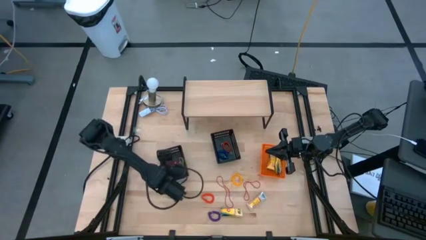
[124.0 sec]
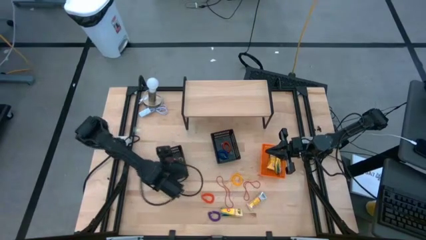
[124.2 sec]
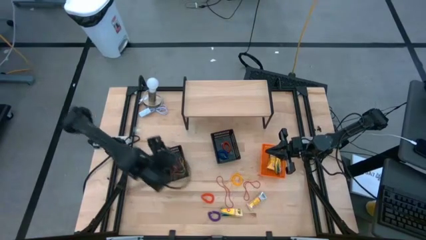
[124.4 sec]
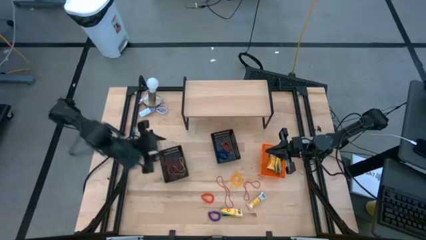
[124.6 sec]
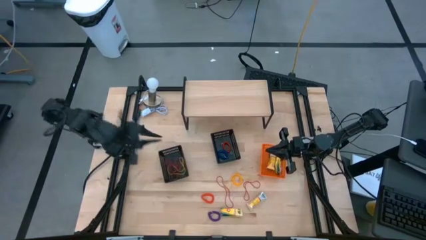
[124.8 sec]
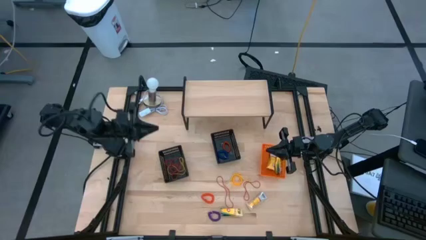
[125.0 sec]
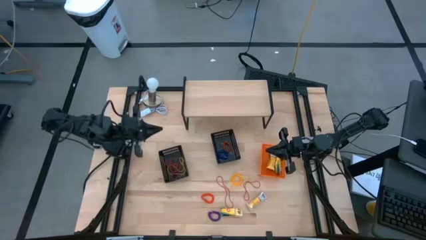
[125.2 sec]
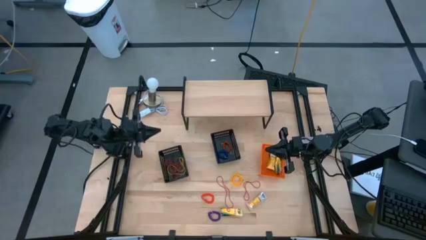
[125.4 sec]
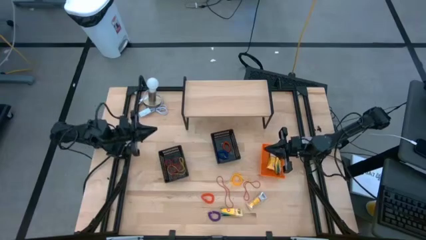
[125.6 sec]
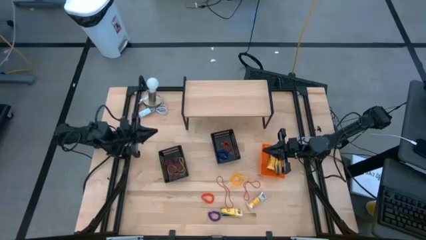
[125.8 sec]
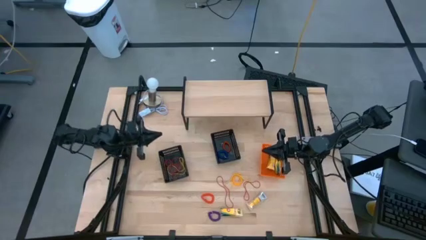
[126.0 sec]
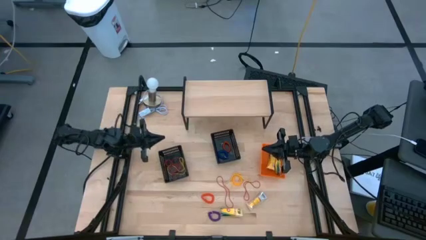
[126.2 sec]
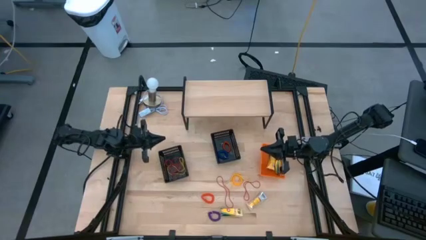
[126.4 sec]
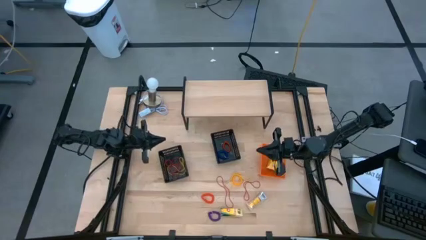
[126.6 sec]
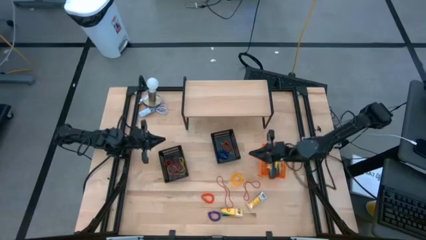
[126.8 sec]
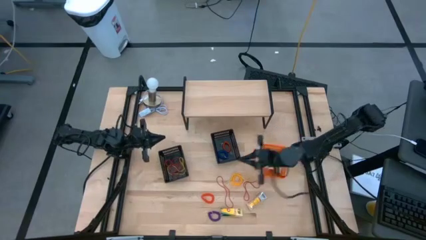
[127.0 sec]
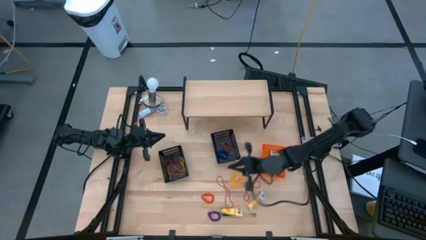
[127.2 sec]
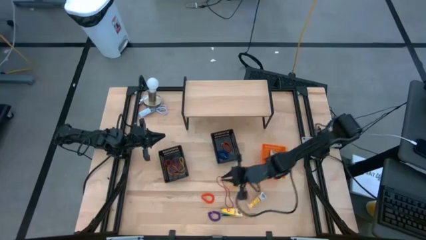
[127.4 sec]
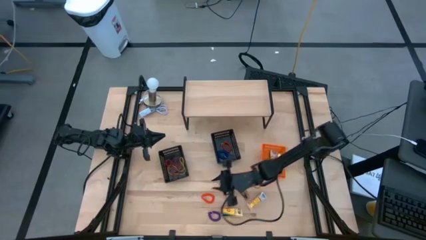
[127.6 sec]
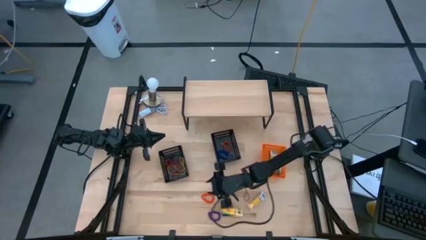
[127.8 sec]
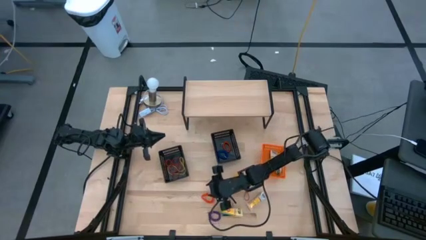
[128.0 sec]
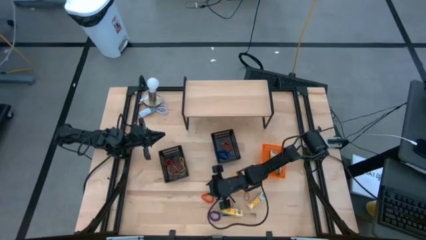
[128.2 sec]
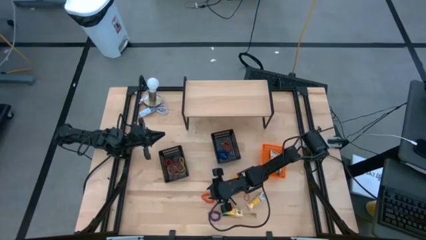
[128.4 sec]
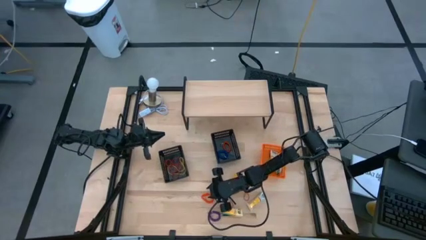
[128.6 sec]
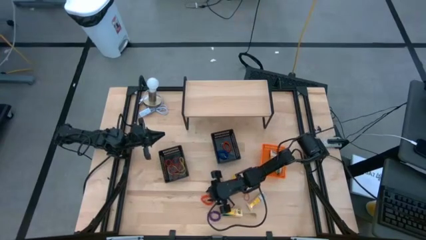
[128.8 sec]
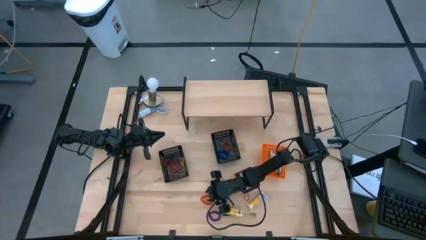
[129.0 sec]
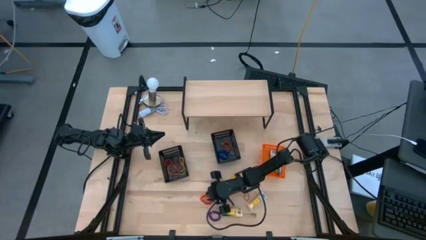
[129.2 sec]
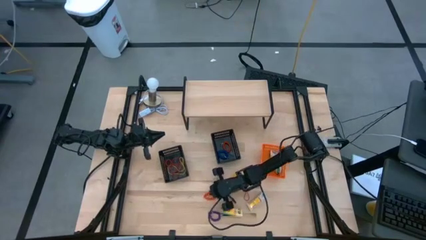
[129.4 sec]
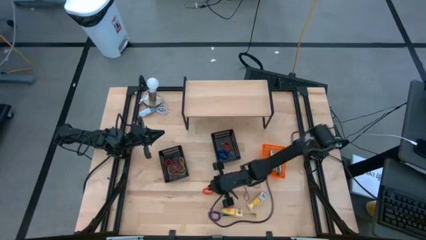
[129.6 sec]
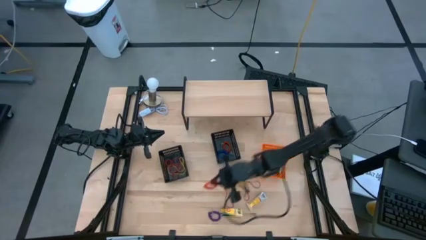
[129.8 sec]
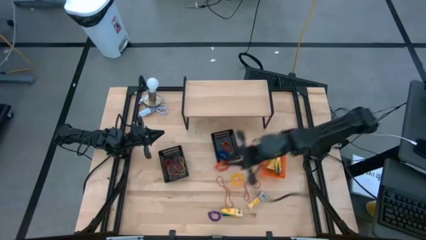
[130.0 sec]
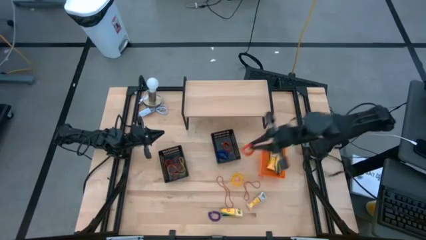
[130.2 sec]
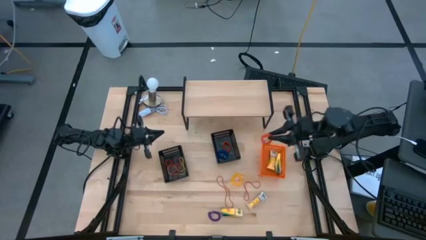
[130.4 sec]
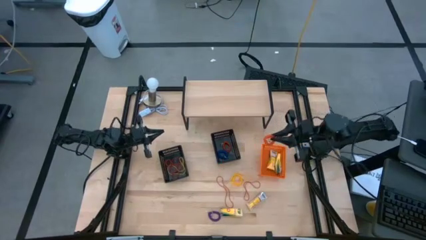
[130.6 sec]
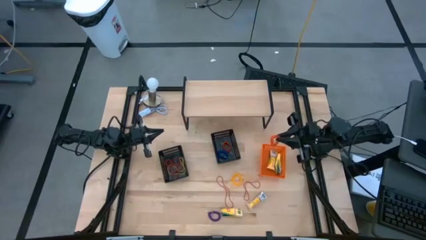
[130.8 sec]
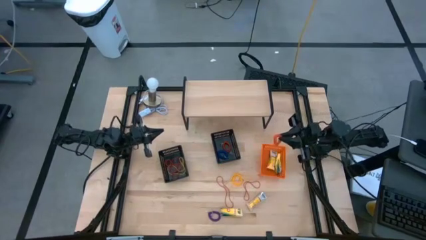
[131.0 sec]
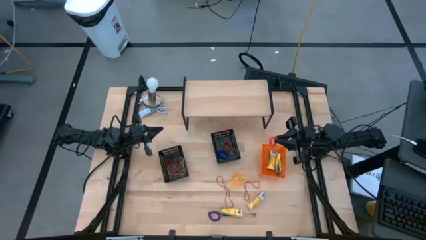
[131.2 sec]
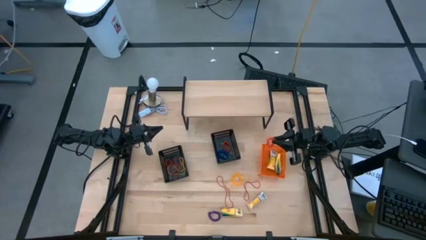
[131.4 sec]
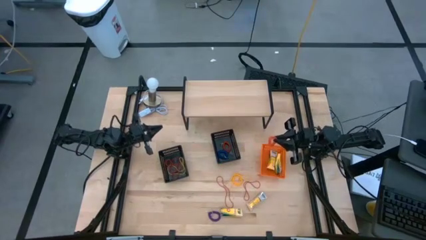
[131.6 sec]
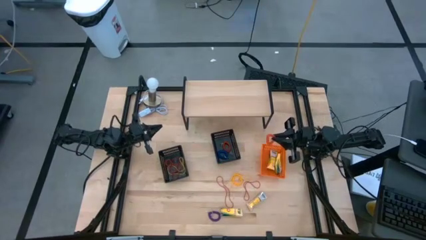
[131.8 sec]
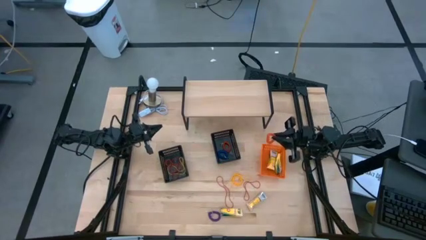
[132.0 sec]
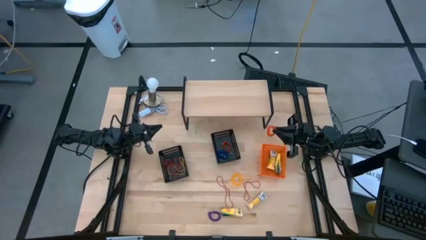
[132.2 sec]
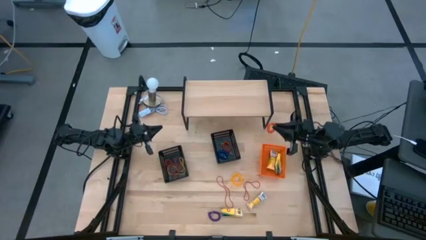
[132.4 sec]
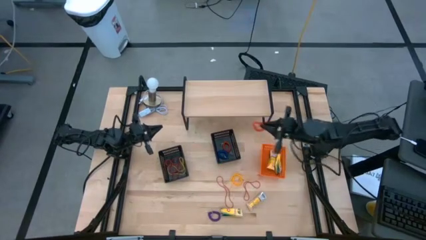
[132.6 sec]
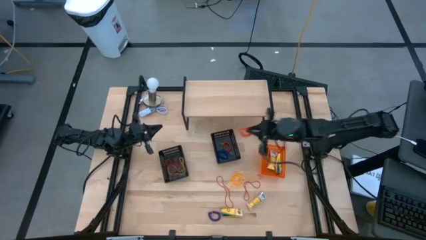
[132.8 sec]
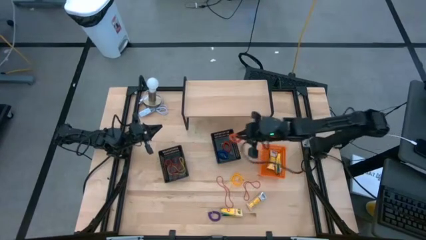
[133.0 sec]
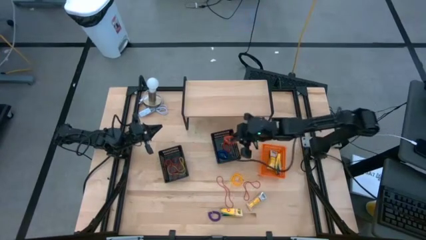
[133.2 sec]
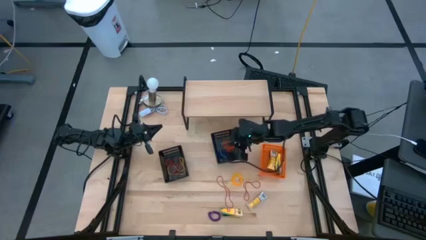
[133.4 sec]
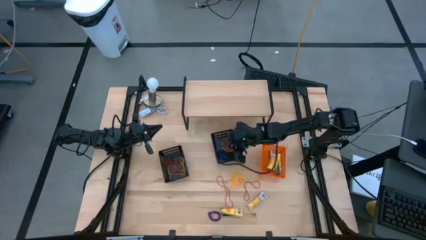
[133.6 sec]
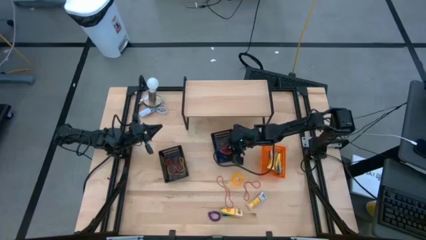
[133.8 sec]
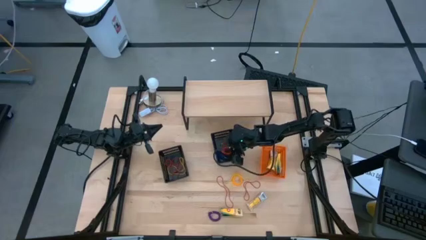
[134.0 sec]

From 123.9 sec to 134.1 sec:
Task: Pick & Place Office Desk Supplies
Put the orange spring rubberband into the right black

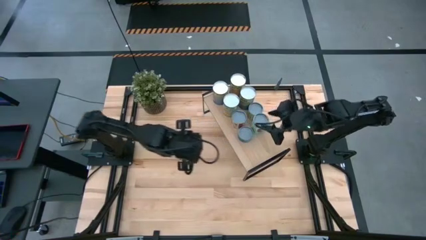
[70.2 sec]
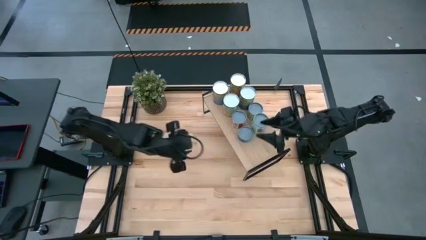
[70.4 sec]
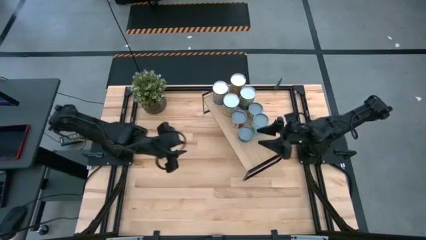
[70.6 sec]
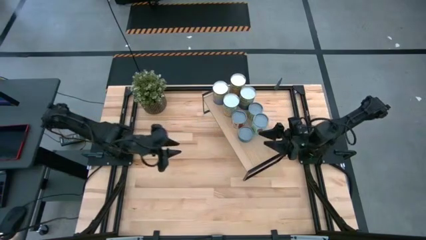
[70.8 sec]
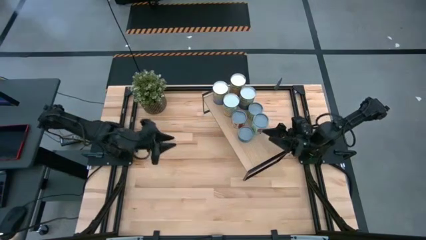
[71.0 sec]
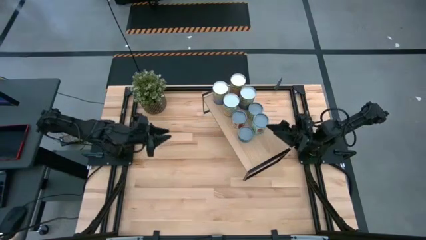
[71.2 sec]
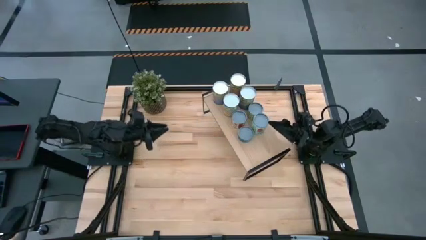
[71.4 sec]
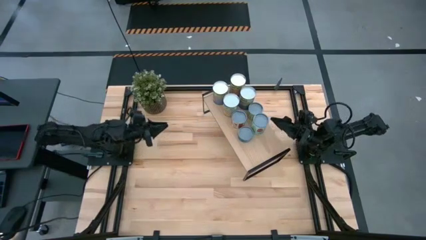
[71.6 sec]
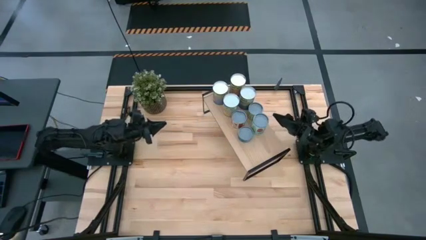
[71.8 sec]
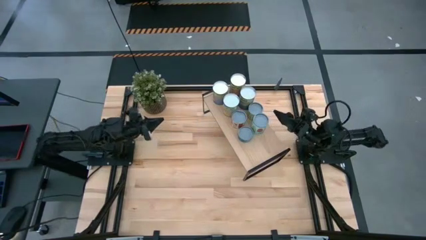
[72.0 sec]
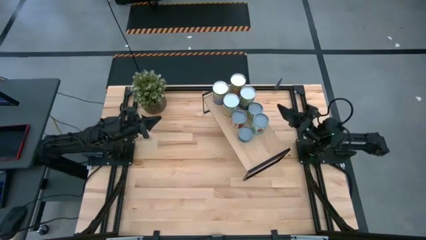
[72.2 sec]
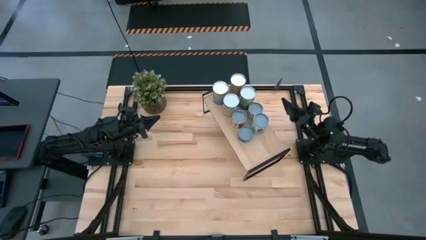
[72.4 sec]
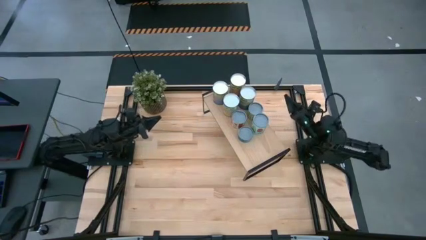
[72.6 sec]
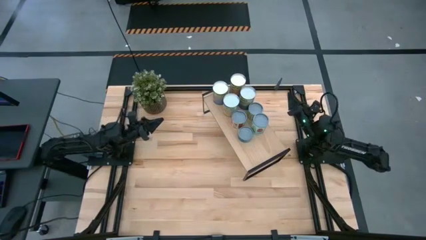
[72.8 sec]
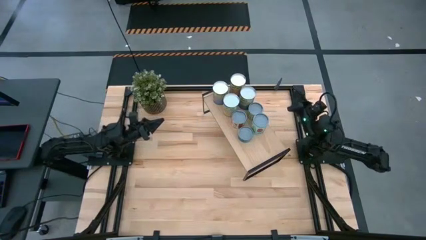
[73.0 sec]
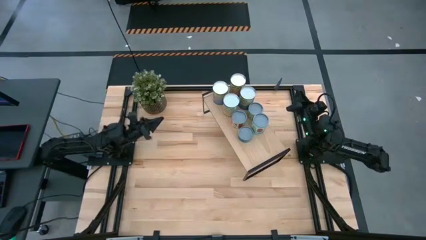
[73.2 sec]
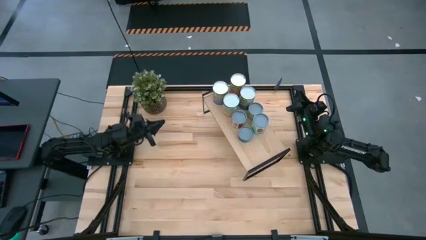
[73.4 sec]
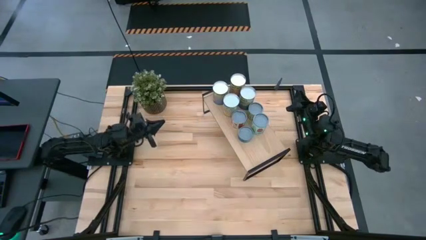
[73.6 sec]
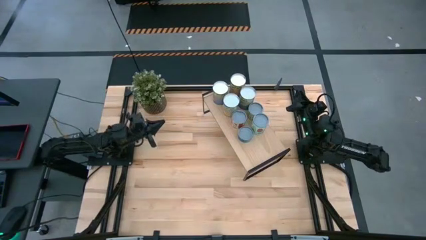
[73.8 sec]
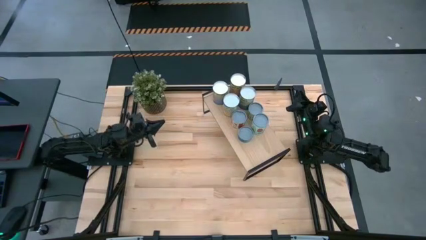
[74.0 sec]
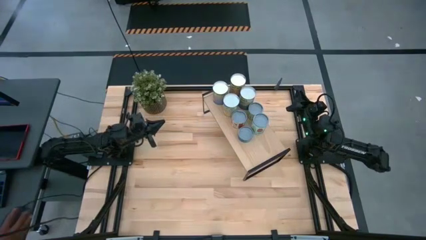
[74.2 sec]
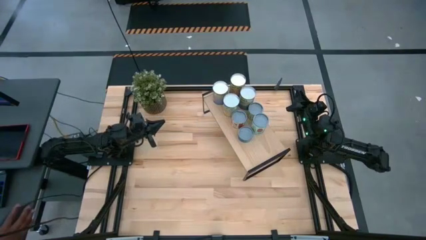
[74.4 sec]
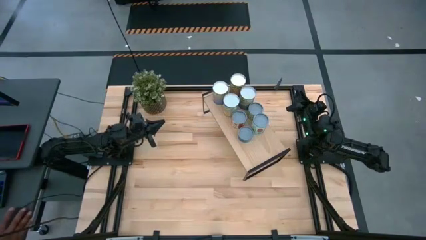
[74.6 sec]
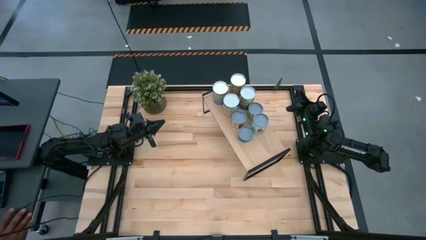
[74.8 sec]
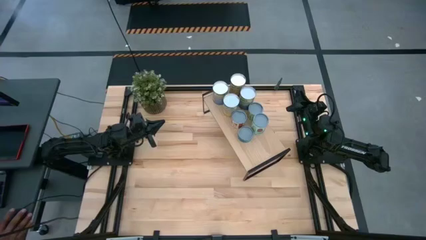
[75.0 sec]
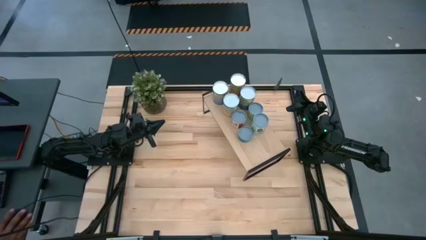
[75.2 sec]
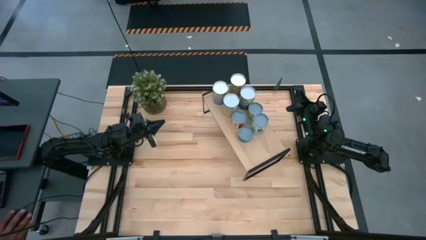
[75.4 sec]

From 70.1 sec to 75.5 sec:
Task: Pick and place cans onto a shelf
Return to Home Position
